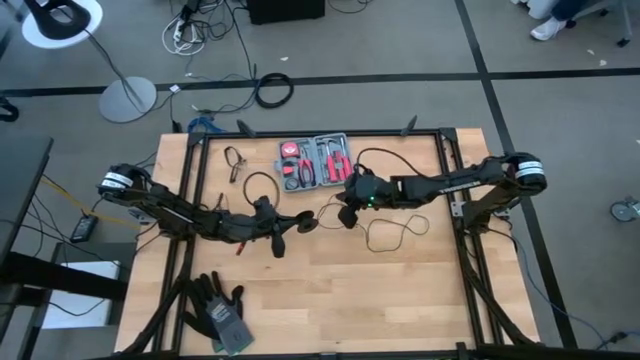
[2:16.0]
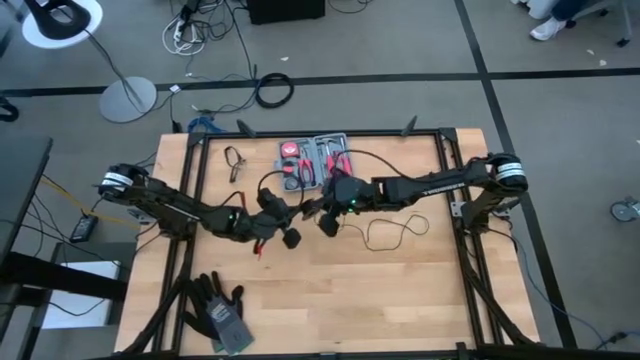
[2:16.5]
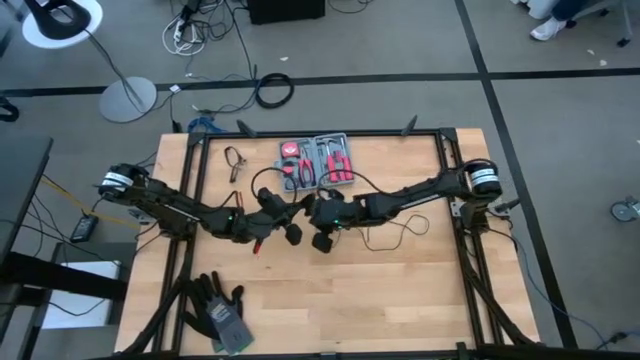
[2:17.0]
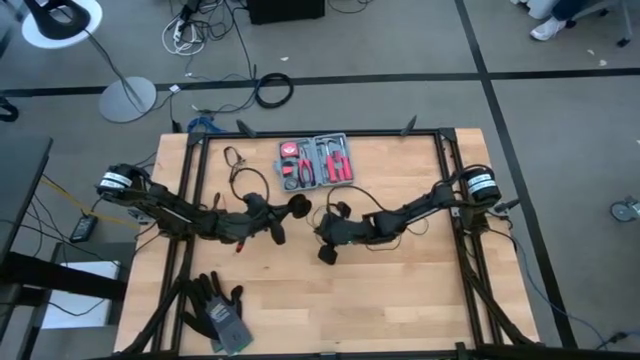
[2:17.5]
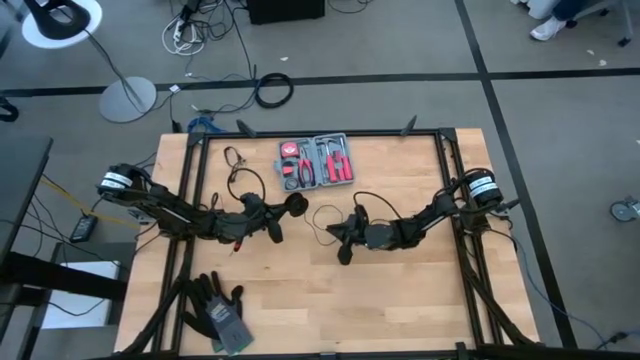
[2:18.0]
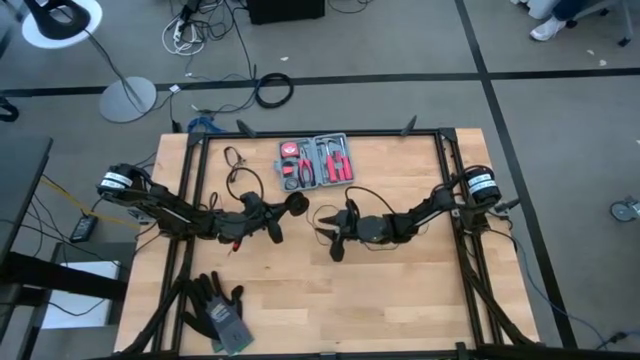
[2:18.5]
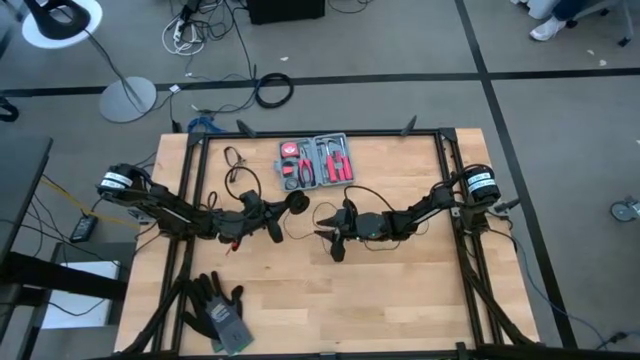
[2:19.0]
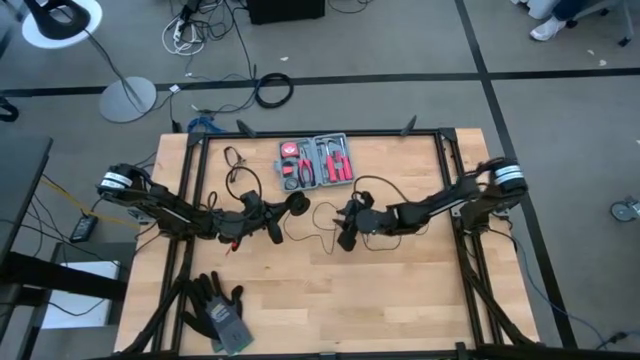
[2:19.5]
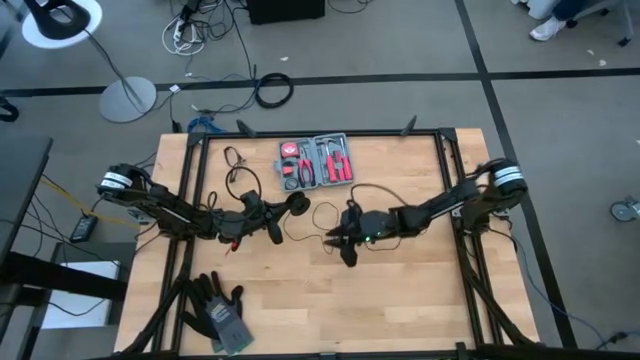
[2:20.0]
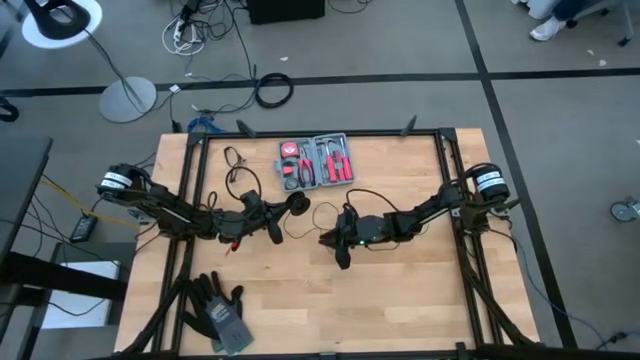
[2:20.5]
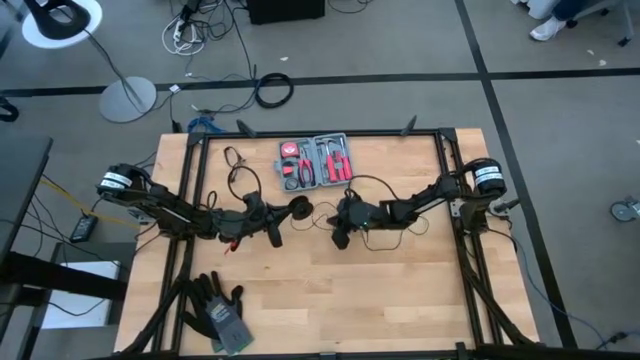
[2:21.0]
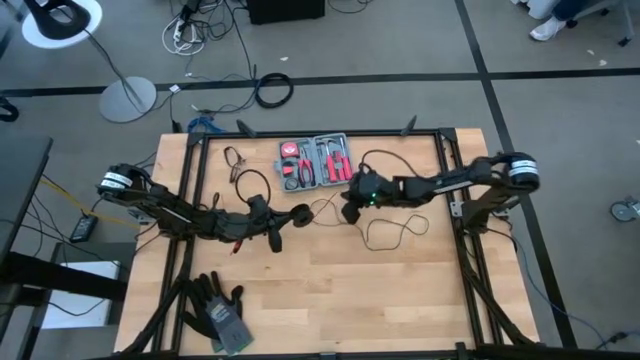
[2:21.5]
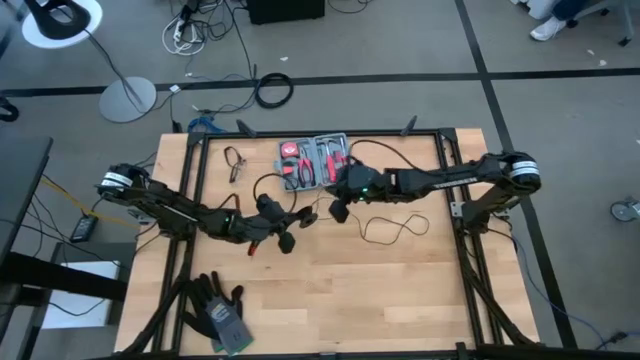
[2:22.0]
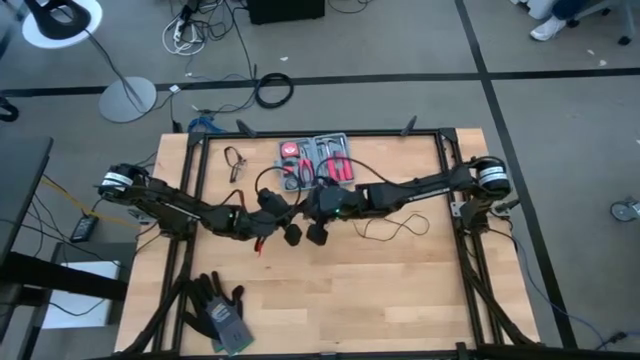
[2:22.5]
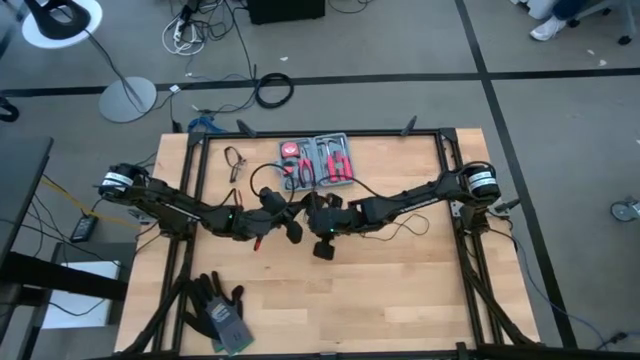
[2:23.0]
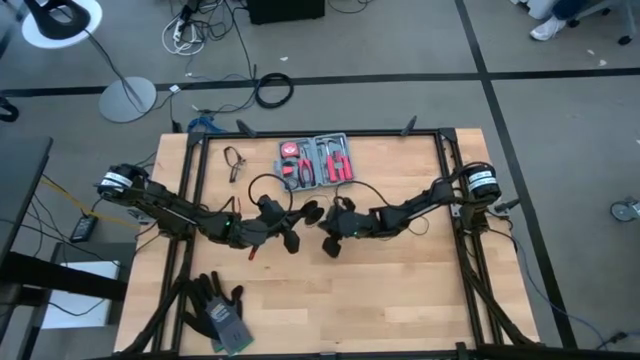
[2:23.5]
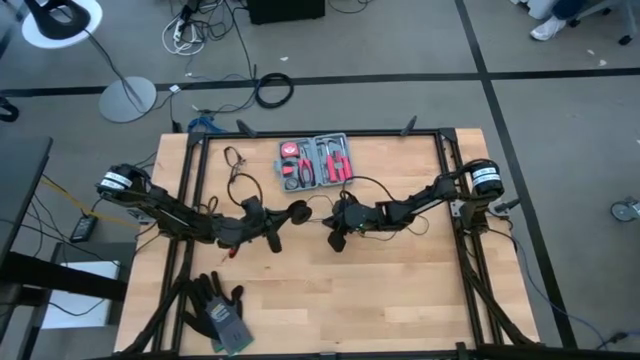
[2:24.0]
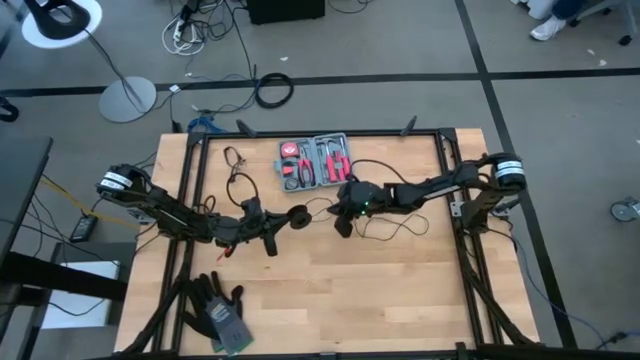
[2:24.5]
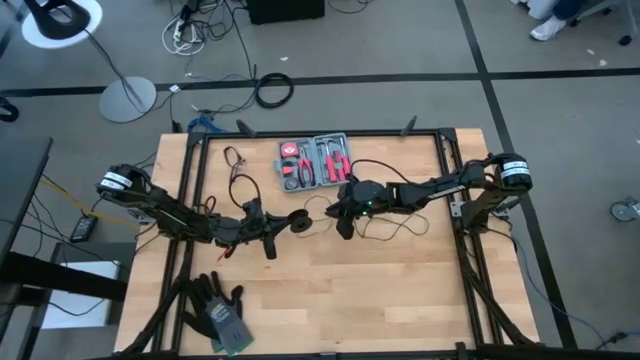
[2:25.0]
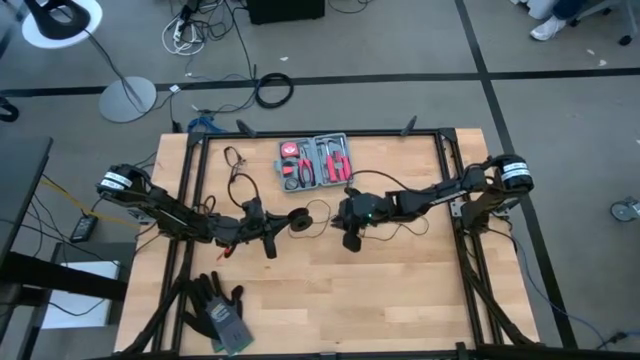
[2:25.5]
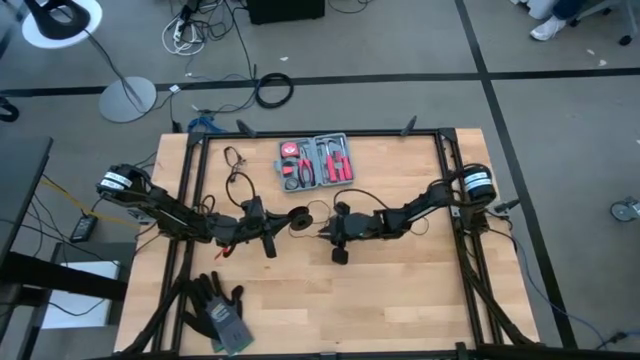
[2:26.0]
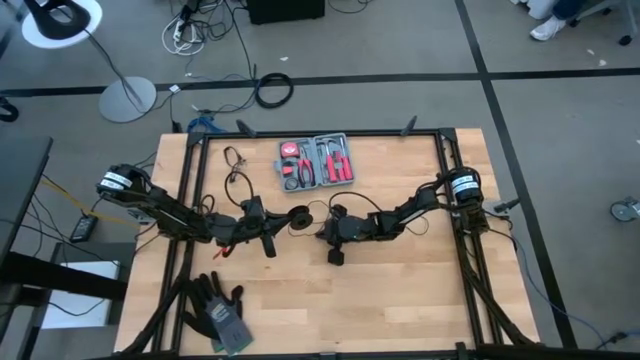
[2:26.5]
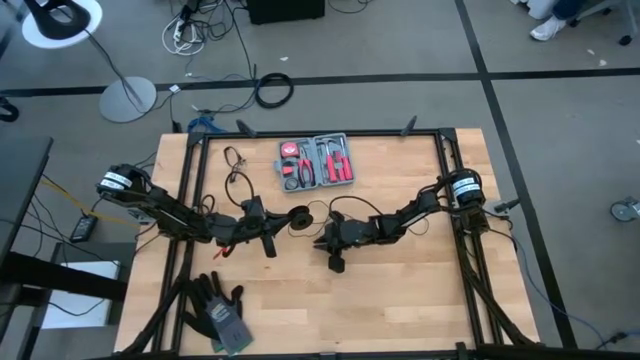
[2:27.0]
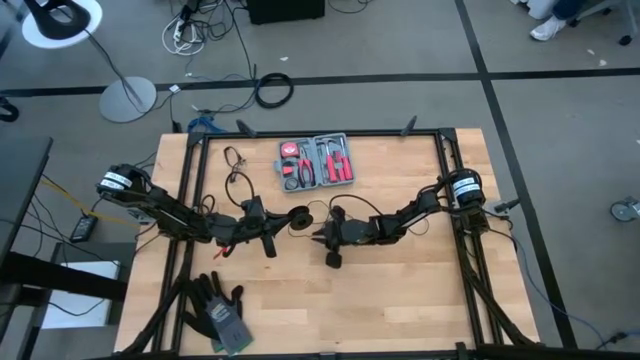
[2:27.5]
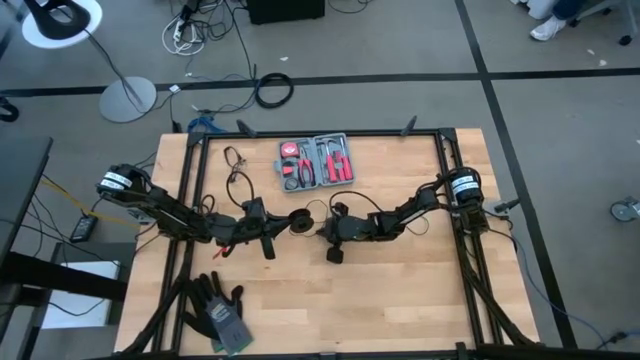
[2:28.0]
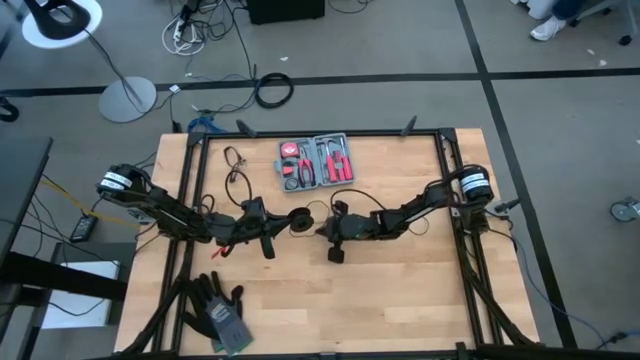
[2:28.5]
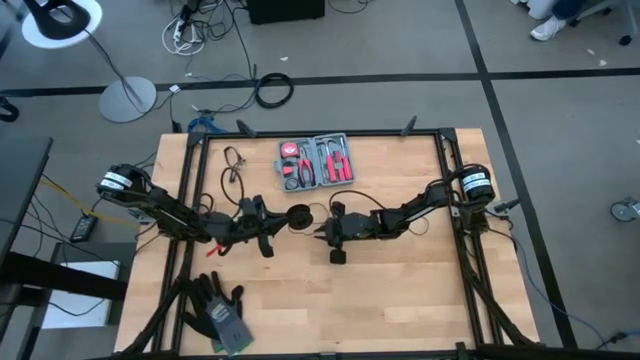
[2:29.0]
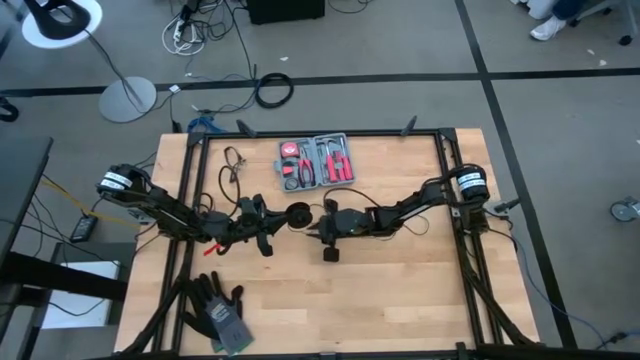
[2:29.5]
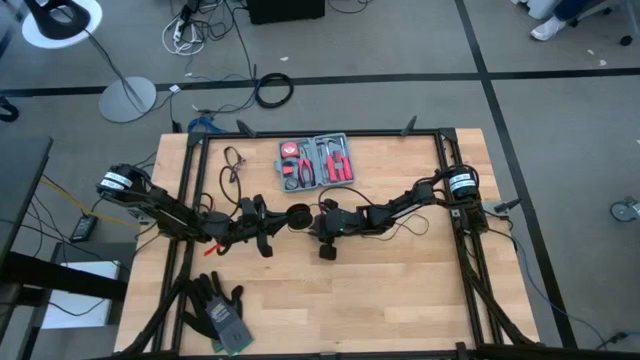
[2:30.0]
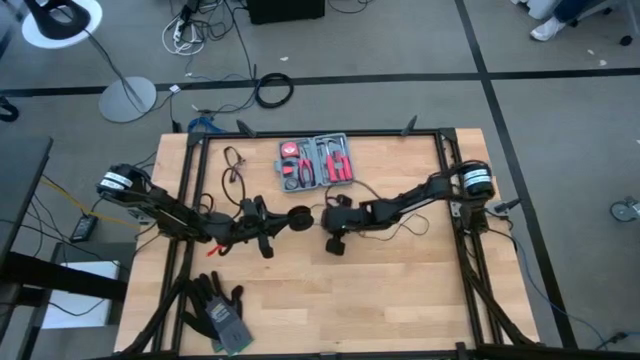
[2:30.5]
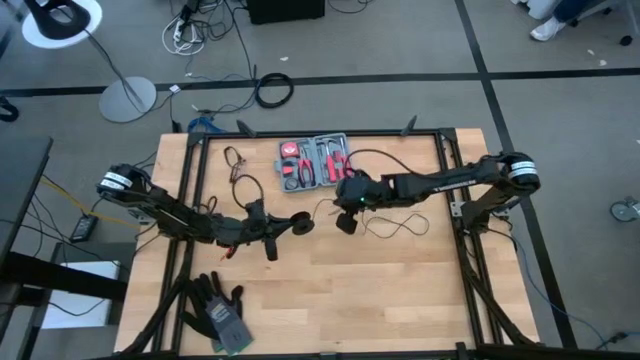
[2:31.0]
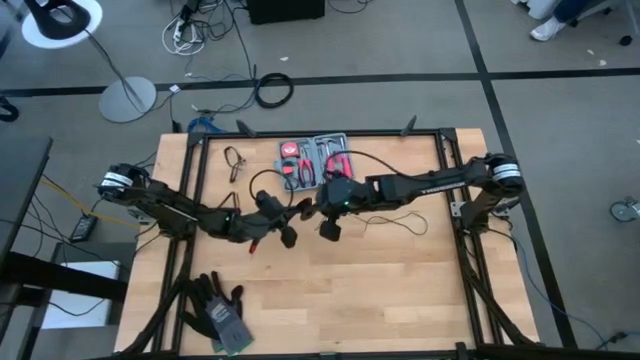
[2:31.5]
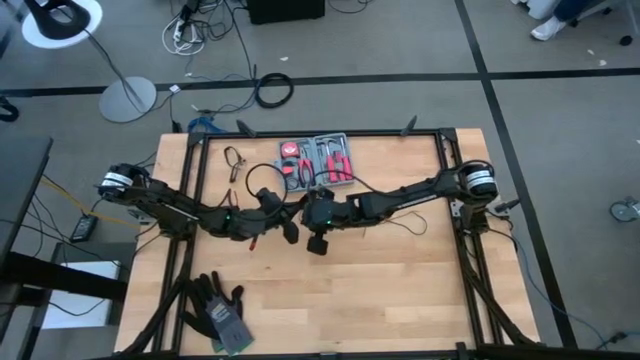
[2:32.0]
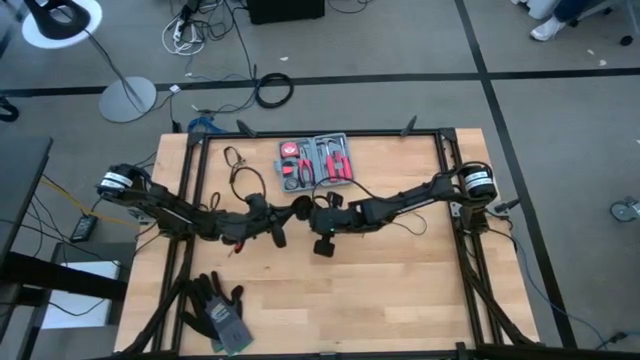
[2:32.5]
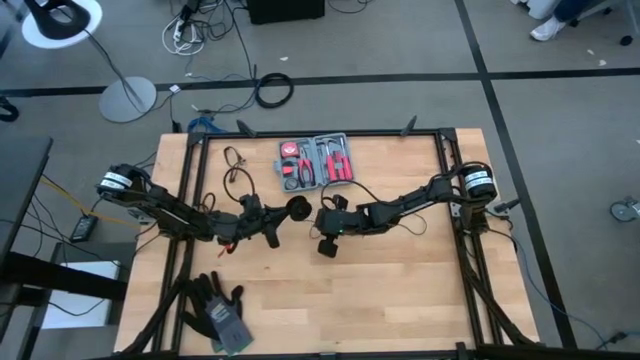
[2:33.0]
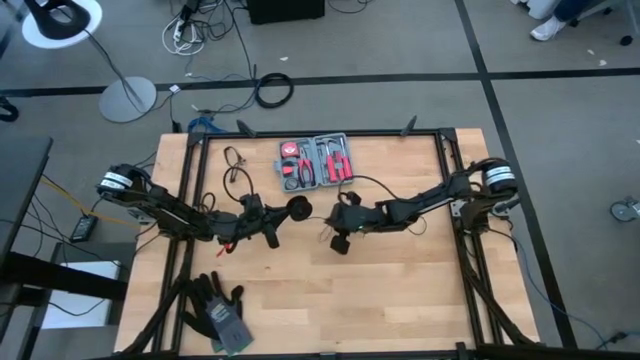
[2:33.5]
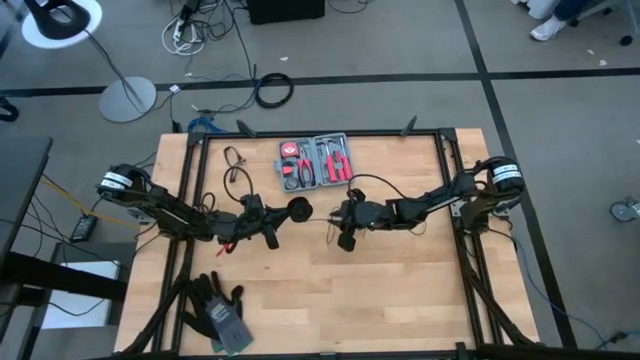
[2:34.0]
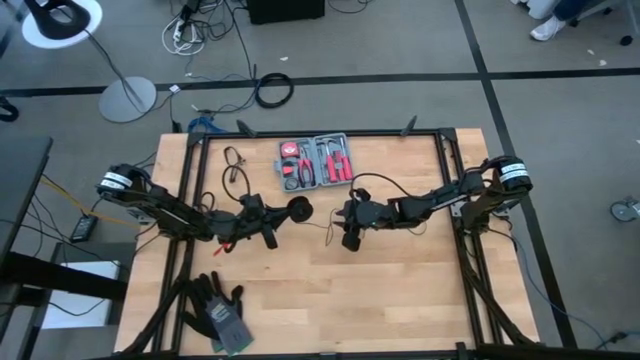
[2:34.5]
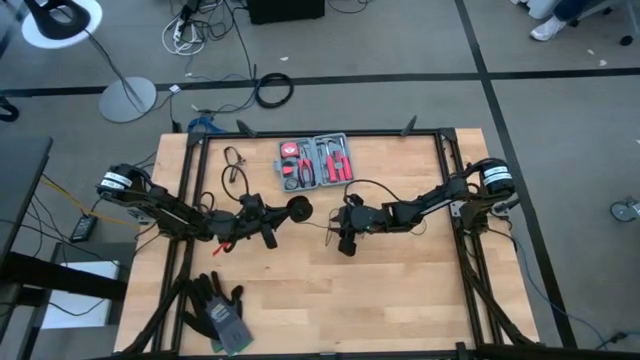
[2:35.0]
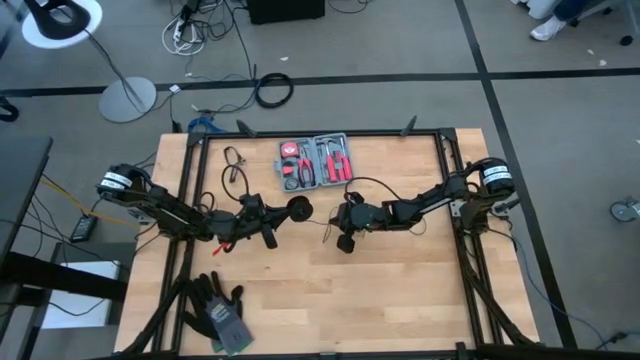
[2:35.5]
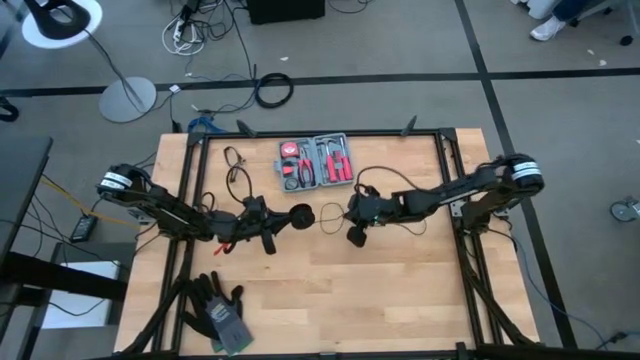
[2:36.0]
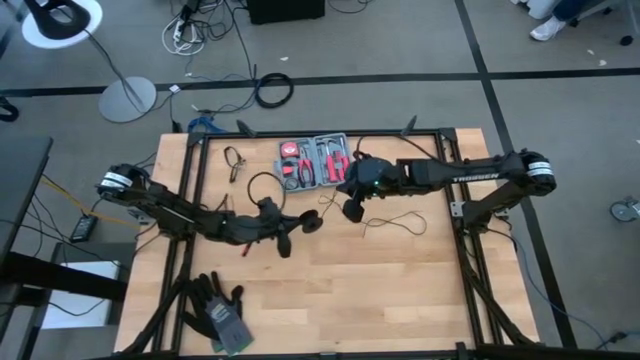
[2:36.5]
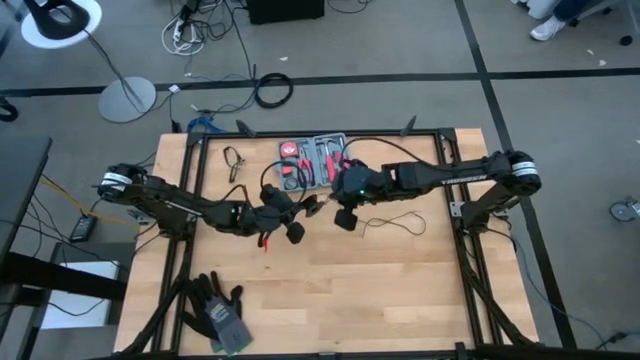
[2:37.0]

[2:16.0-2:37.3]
Task: Coil cords
Coil the black wire onto the black spool

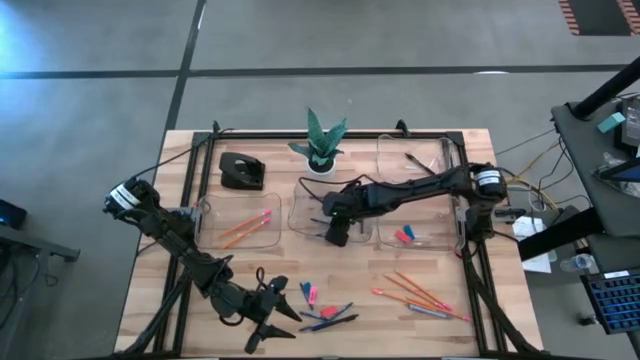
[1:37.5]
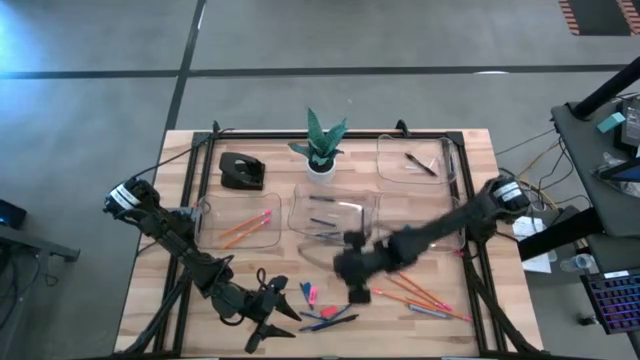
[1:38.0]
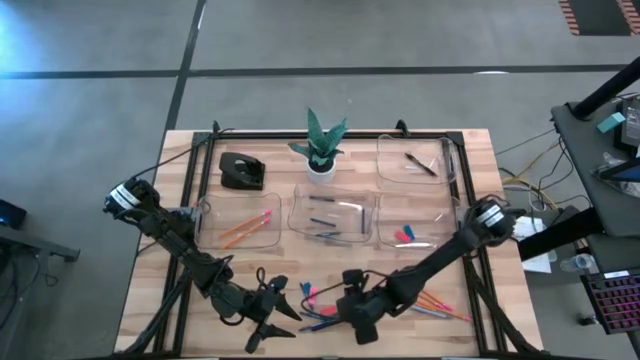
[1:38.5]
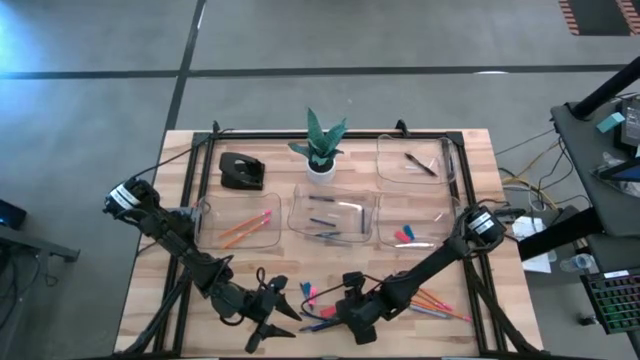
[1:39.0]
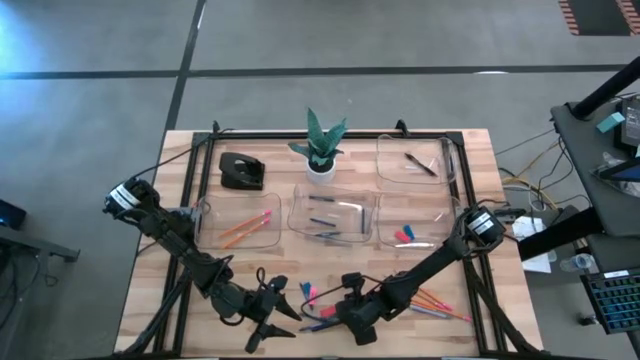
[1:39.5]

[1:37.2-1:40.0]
Task: Sort crayons/erasers/pens/pencils in bins
Put the blue crayon into the middle transparent bin
